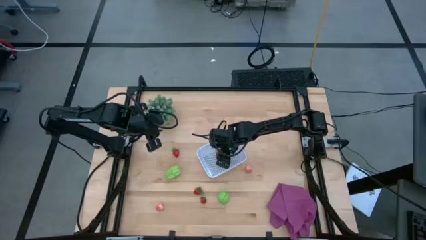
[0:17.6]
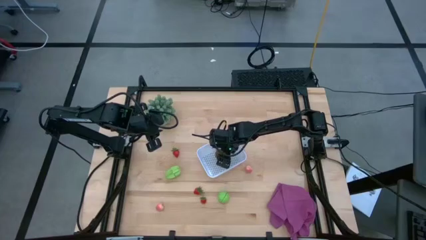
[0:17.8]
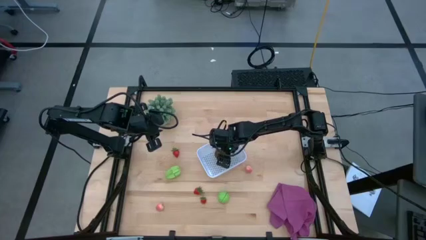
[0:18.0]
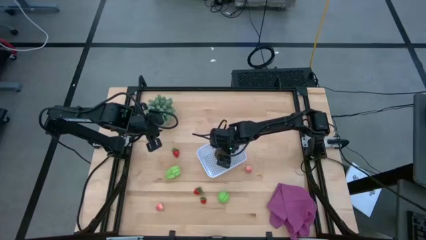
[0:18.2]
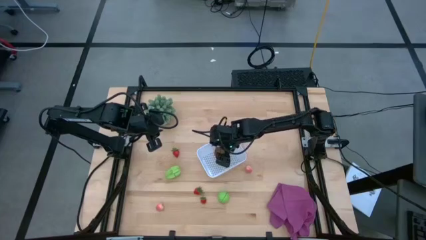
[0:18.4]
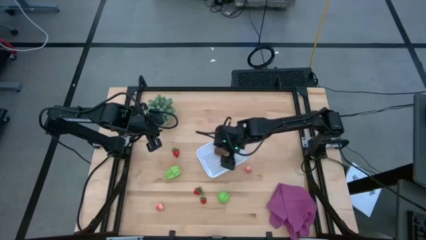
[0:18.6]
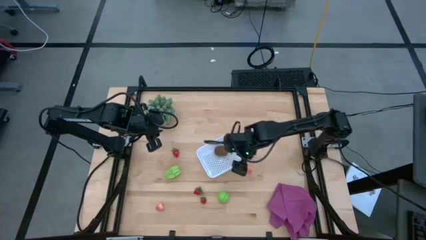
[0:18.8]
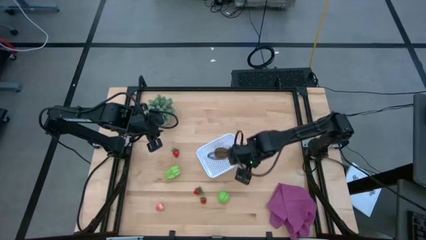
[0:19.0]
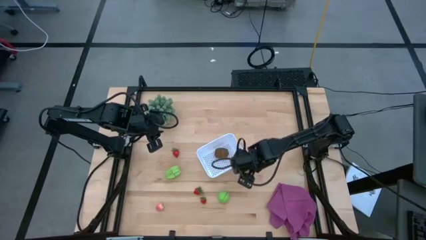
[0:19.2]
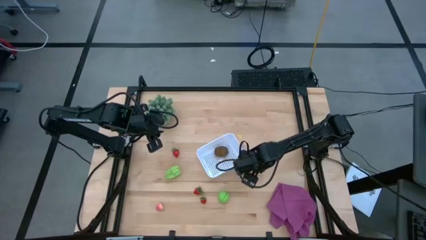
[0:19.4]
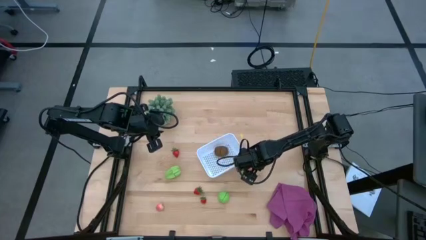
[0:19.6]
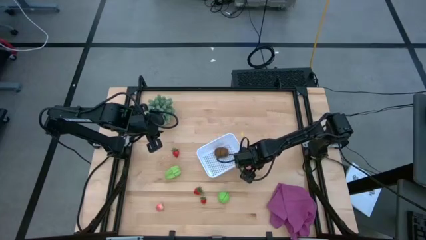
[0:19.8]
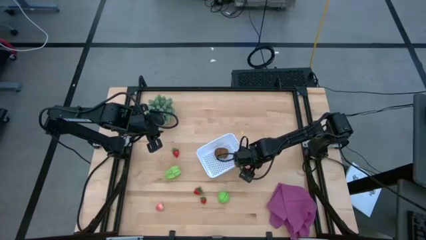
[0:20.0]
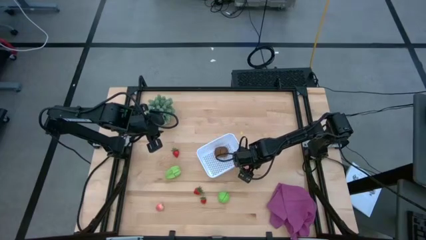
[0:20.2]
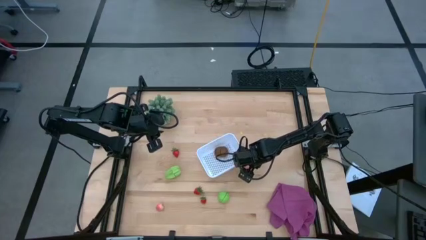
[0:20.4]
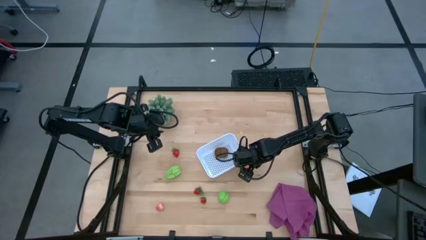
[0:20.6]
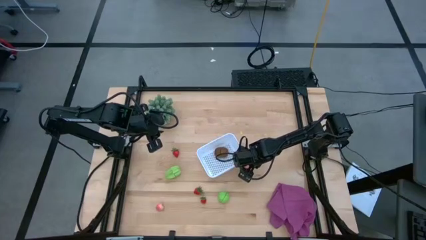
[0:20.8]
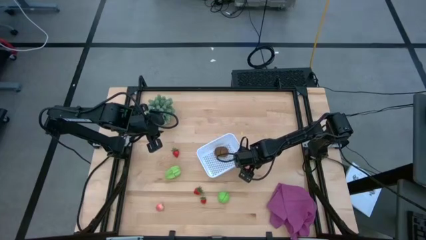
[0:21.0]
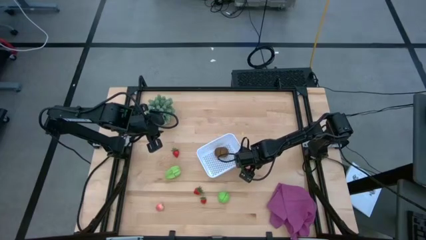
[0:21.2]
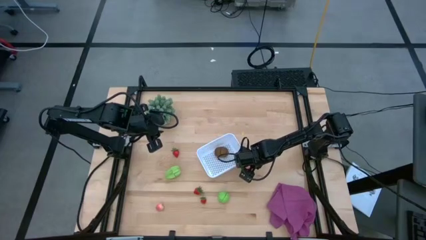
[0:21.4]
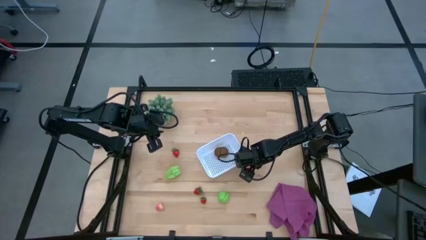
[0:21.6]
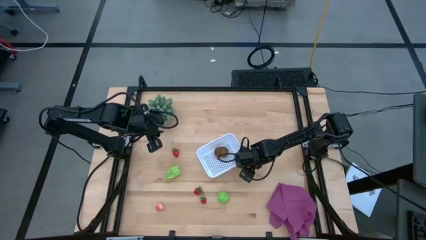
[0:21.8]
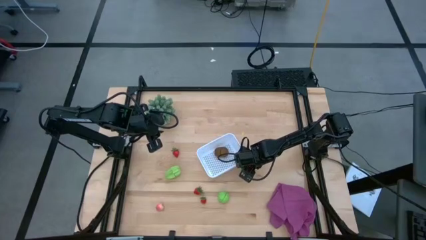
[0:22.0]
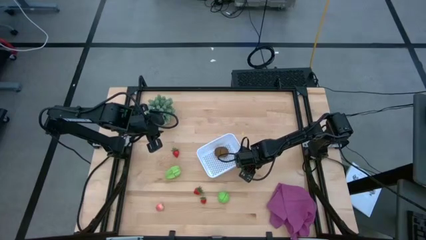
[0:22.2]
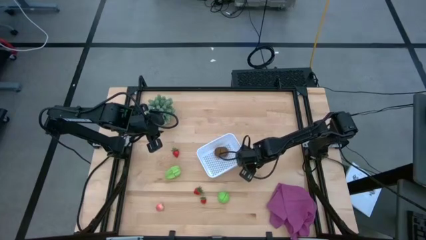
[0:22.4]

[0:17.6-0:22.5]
Task: Pick and placing Produce into tupperware
Put the top peach into the white bin

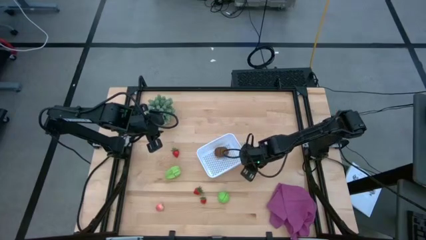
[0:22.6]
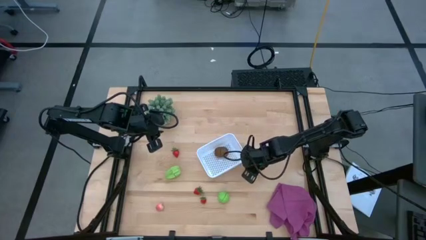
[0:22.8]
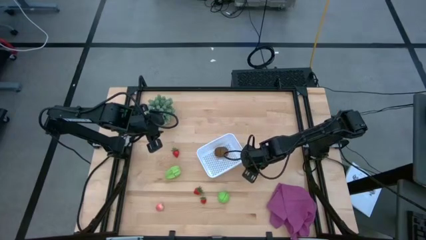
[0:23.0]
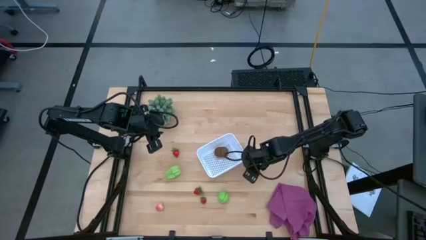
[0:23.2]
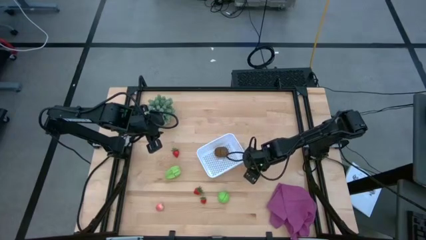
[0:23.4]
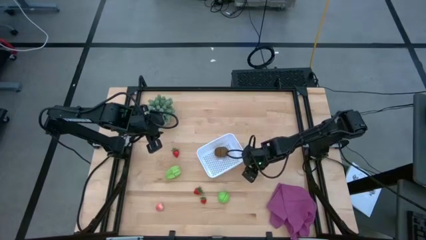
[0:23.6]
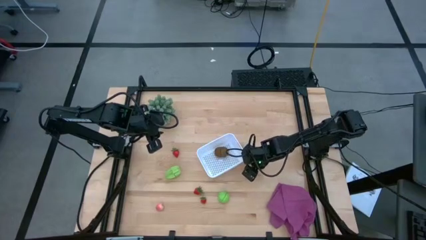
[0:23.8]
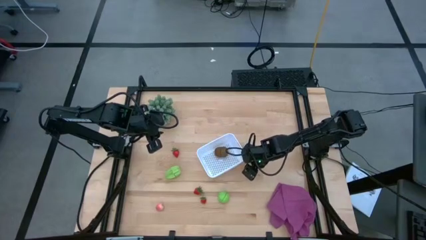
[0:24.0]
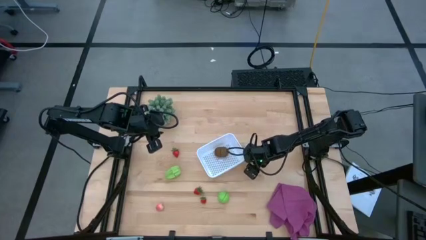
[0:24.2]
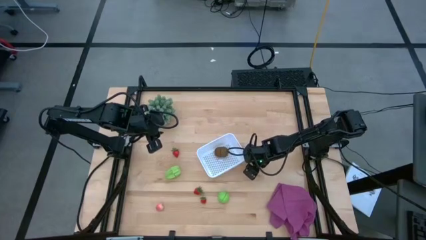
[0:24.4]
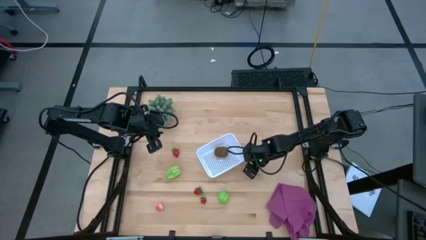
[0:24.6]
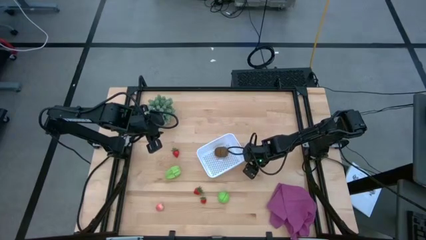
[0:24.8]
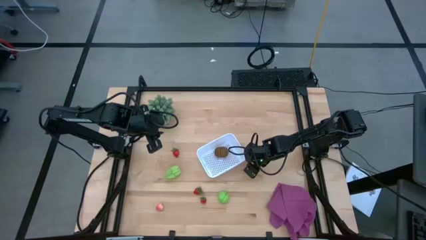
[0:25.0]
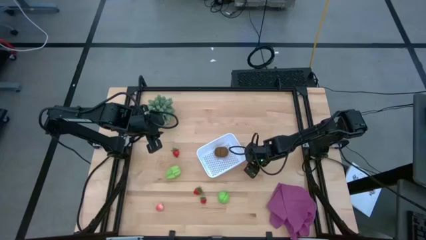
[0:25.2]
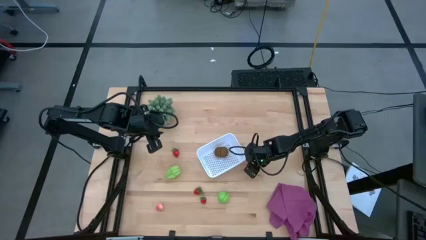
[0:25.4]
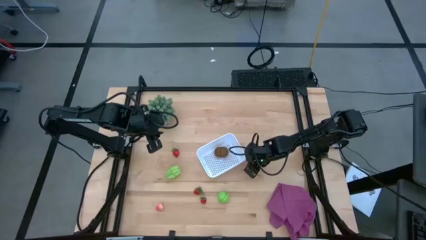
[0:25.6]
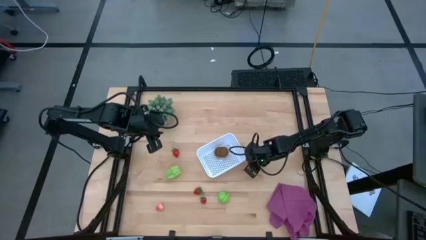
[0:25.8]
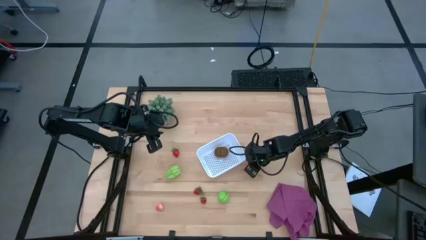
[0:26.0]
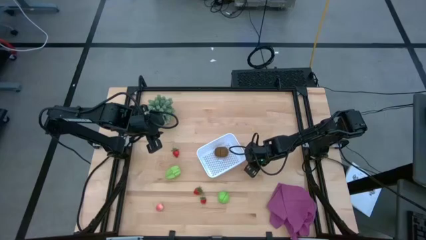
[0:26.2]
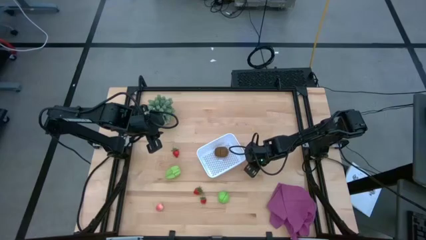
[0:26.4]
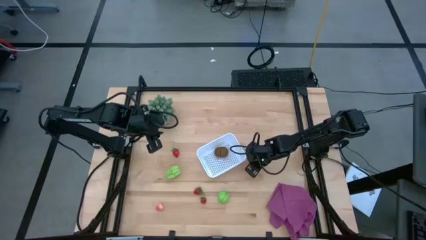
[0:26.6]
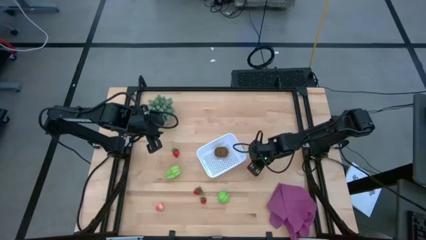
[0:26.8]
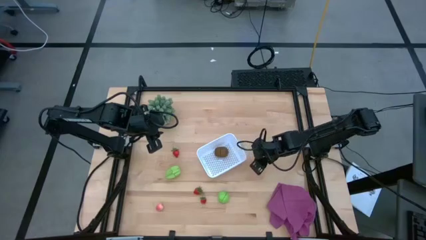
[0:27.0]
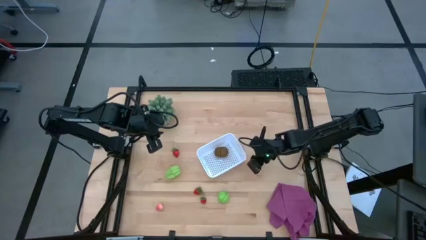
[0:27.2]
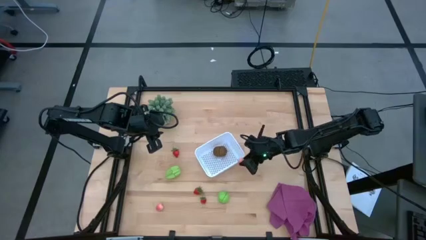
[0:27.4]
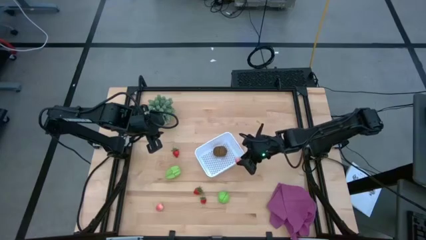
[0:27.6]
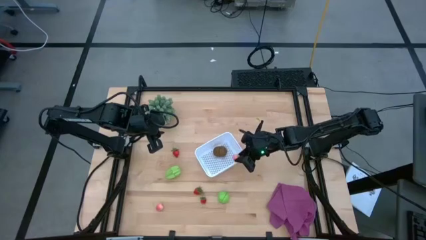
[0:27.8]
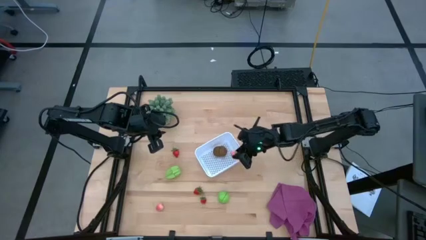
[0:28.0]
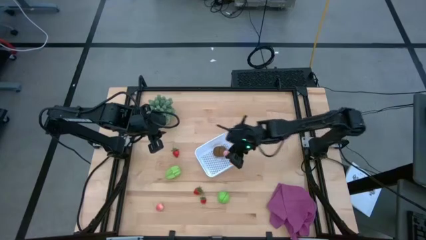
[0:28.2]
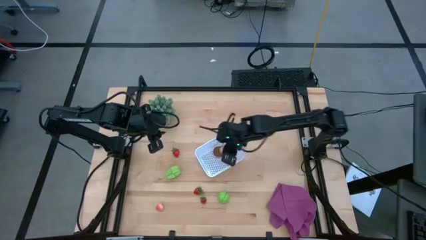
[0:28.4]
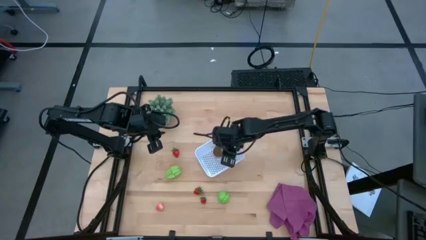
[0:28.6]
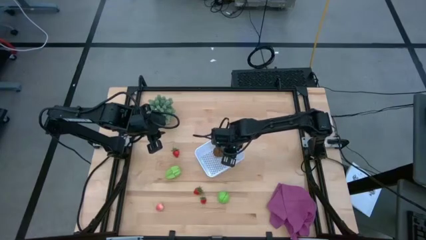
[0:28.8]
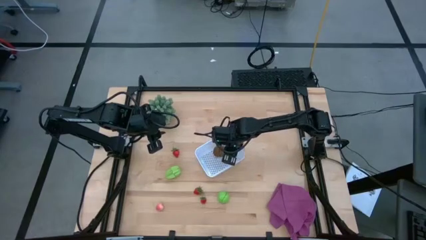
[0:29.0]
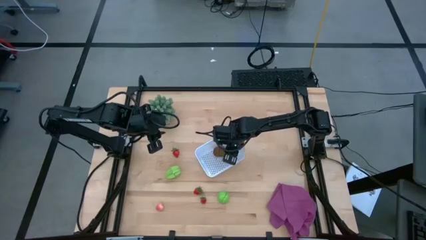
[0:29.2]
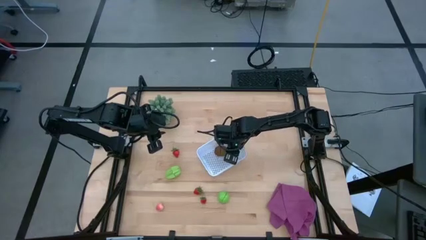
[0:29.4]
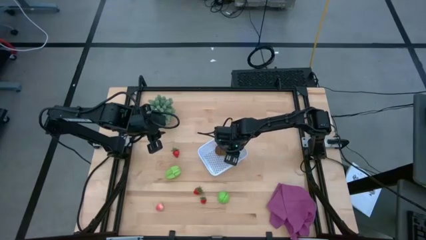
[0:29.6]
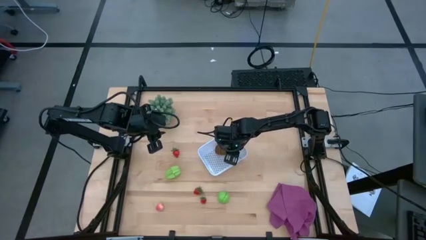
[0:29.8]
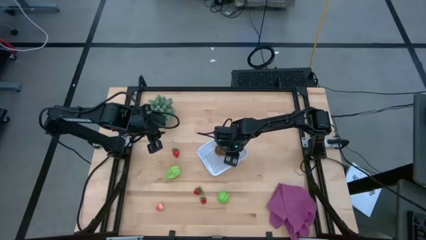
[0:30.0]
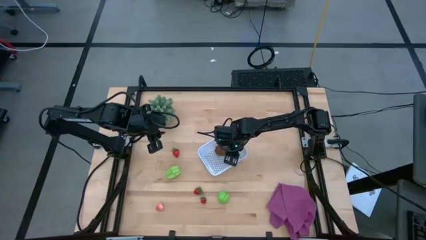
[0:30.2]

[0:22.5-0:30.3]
Put the top peach into the white bin
